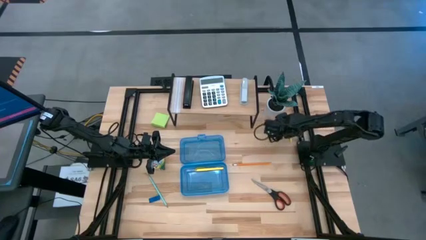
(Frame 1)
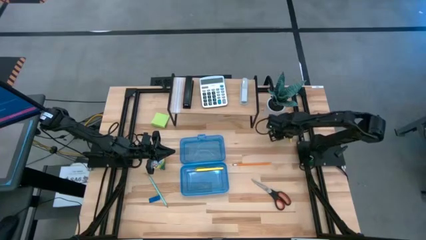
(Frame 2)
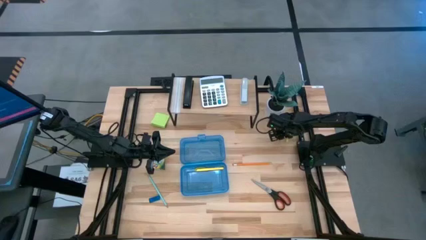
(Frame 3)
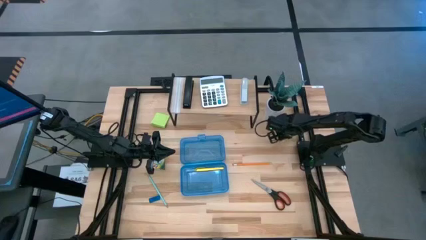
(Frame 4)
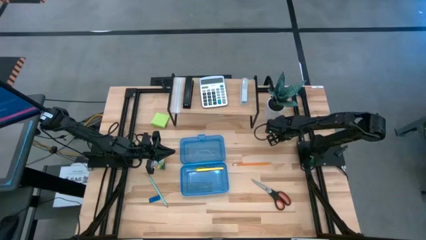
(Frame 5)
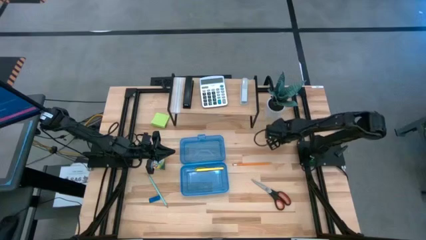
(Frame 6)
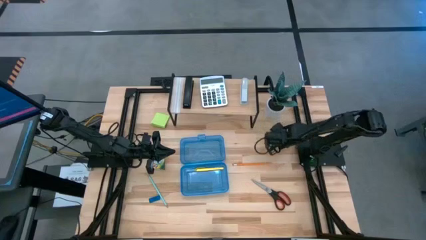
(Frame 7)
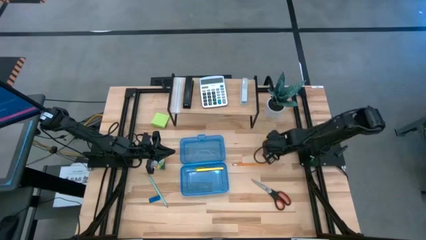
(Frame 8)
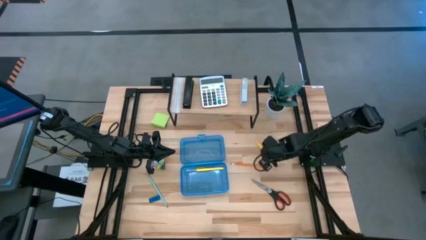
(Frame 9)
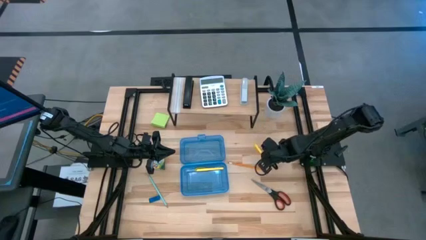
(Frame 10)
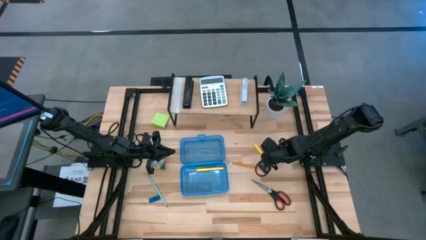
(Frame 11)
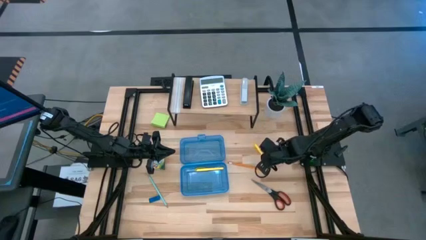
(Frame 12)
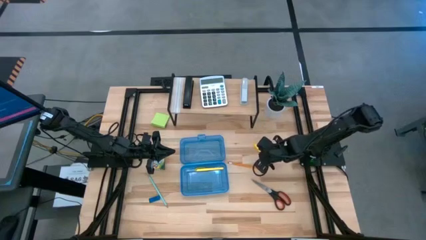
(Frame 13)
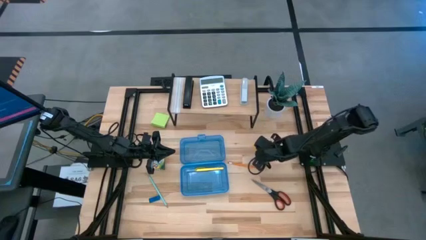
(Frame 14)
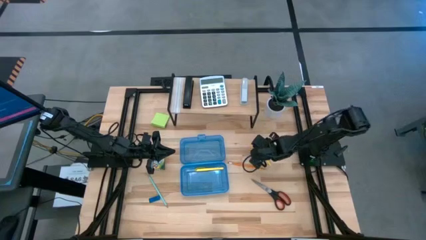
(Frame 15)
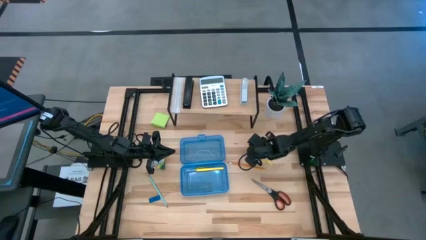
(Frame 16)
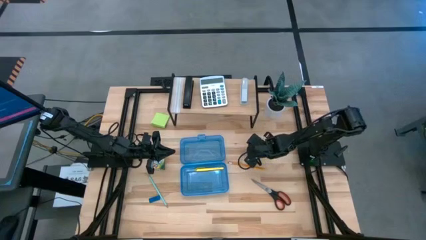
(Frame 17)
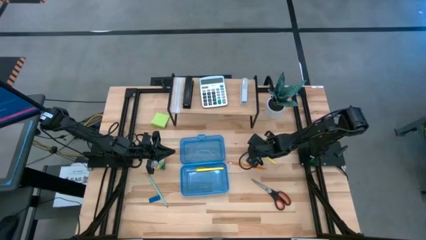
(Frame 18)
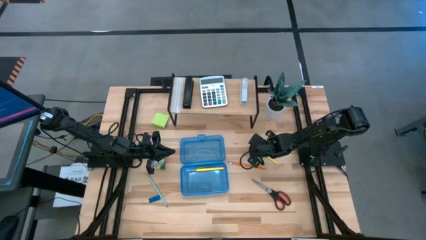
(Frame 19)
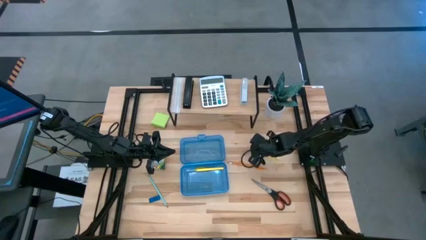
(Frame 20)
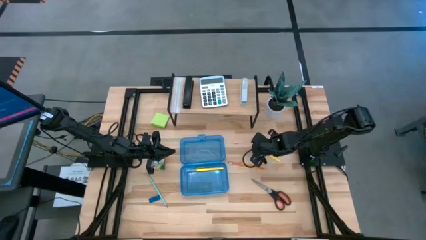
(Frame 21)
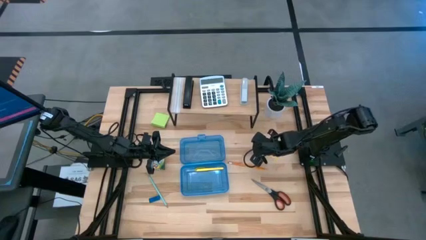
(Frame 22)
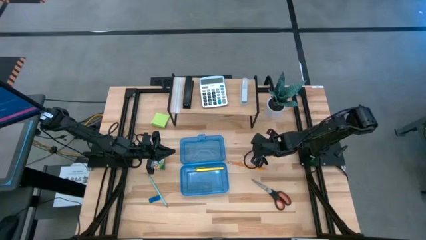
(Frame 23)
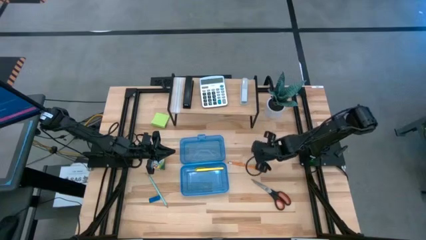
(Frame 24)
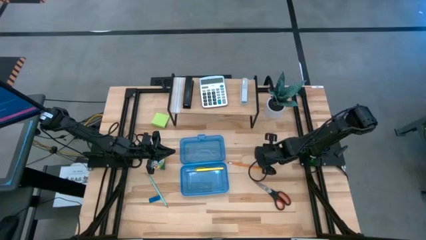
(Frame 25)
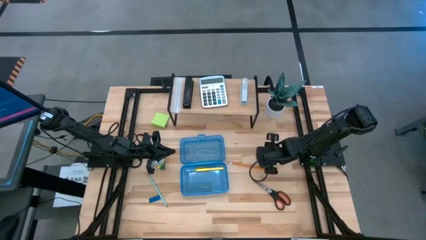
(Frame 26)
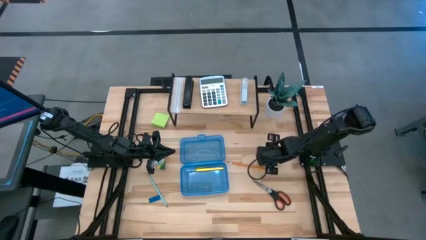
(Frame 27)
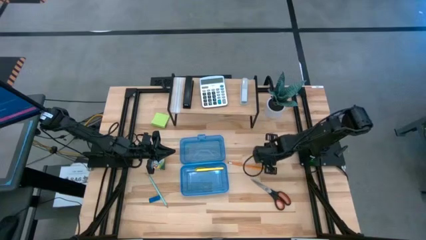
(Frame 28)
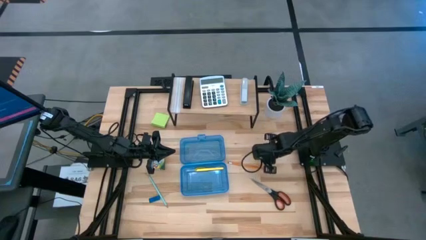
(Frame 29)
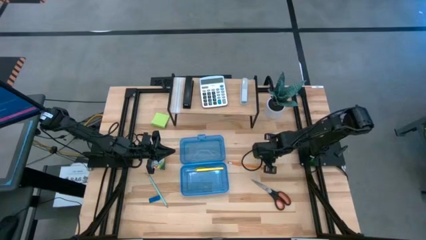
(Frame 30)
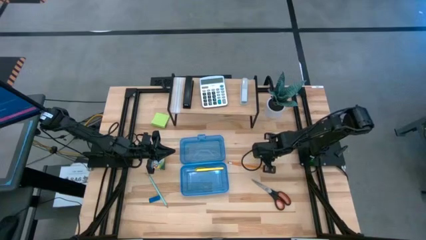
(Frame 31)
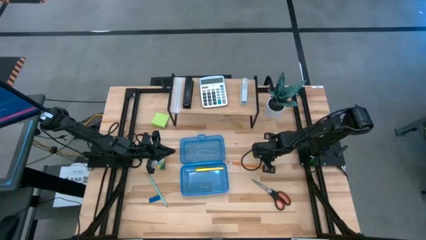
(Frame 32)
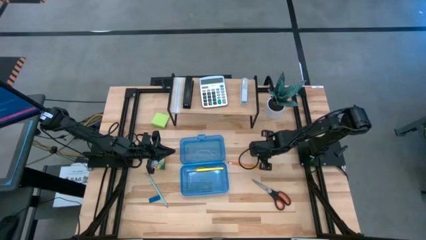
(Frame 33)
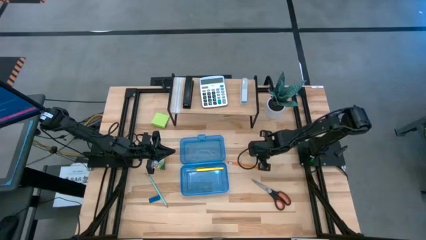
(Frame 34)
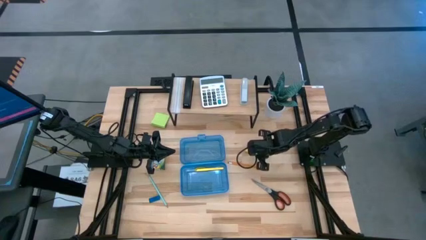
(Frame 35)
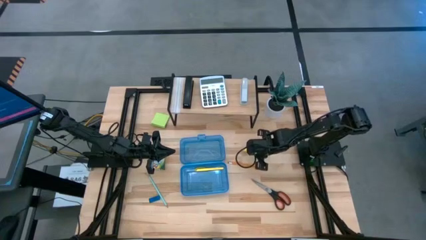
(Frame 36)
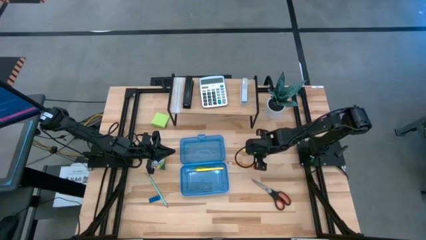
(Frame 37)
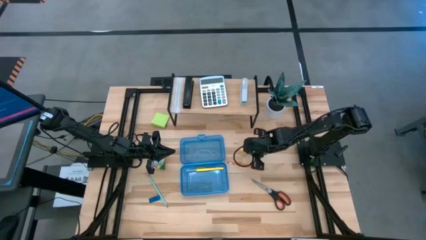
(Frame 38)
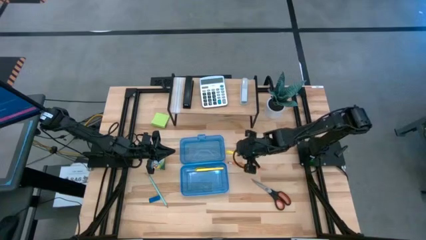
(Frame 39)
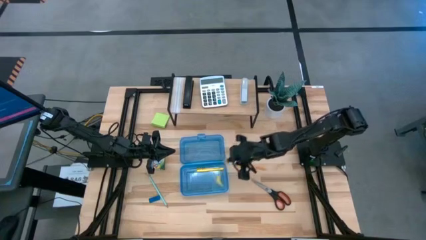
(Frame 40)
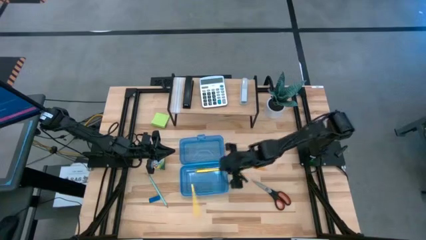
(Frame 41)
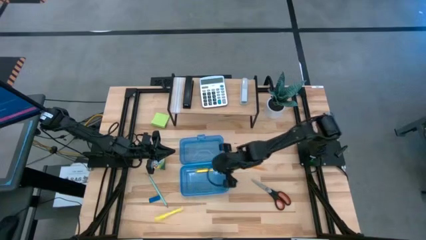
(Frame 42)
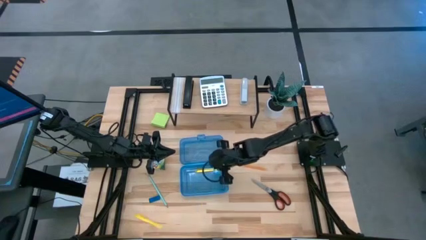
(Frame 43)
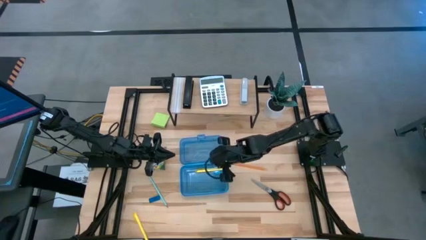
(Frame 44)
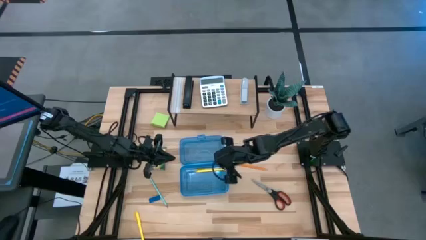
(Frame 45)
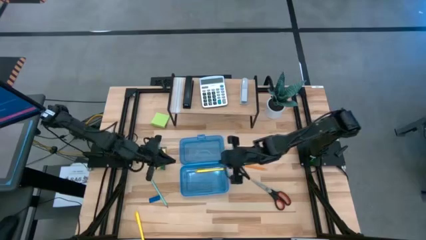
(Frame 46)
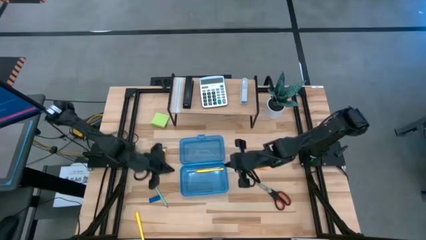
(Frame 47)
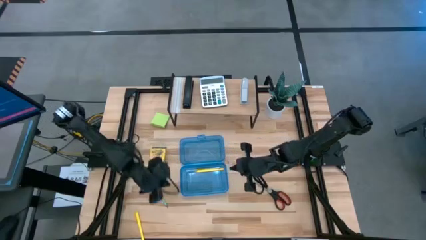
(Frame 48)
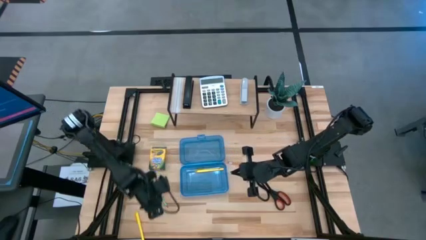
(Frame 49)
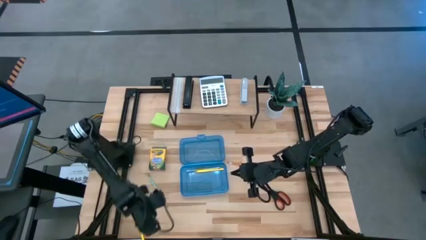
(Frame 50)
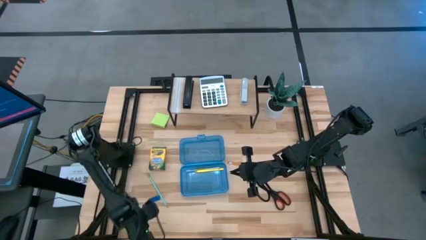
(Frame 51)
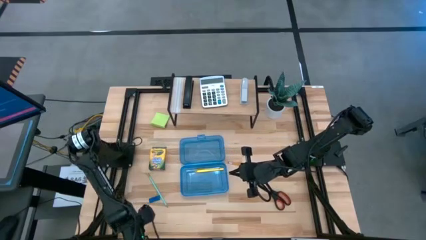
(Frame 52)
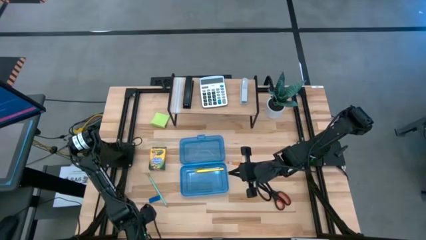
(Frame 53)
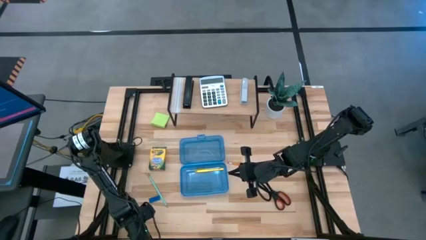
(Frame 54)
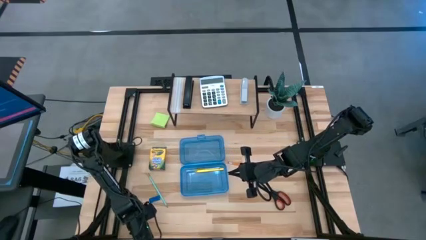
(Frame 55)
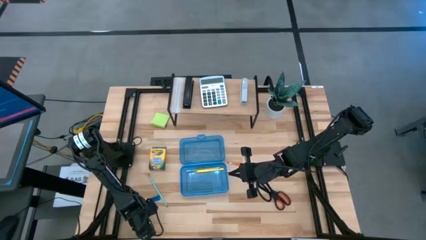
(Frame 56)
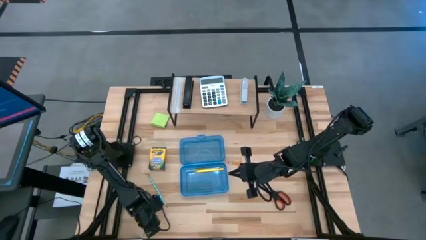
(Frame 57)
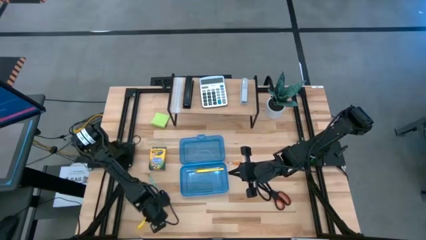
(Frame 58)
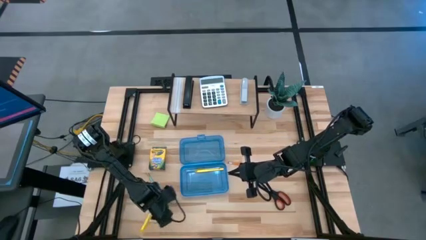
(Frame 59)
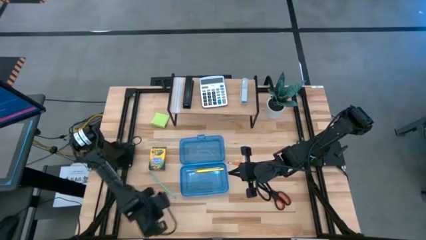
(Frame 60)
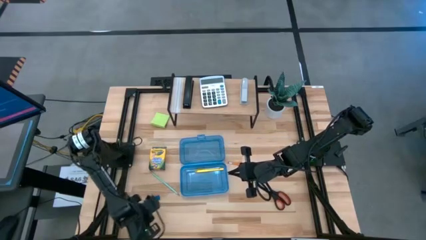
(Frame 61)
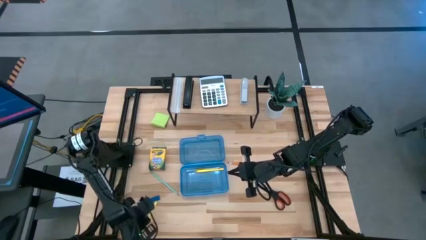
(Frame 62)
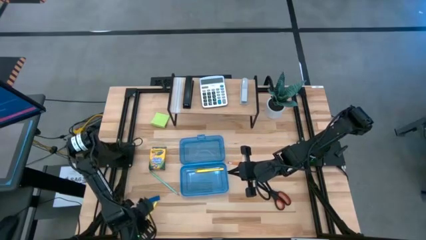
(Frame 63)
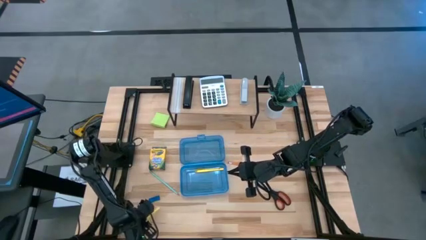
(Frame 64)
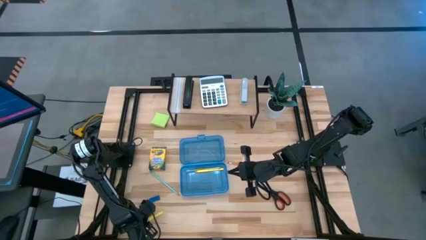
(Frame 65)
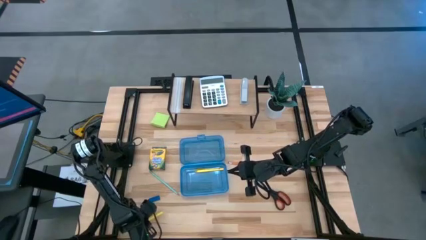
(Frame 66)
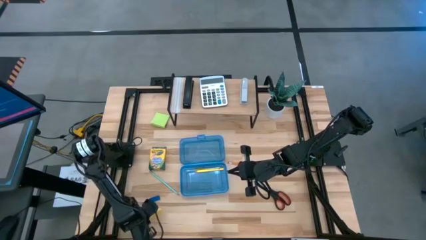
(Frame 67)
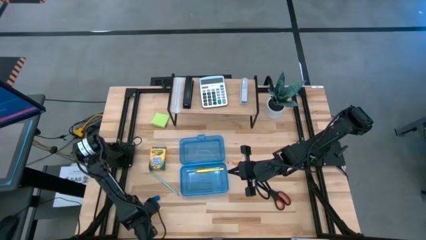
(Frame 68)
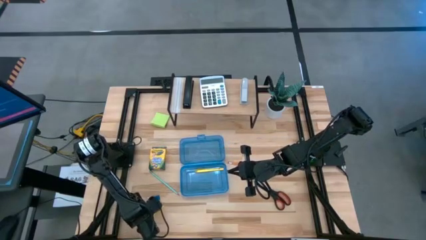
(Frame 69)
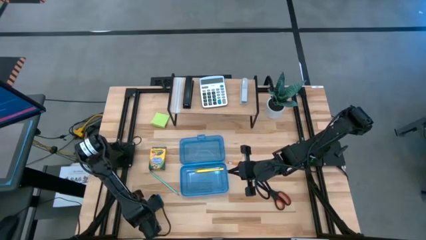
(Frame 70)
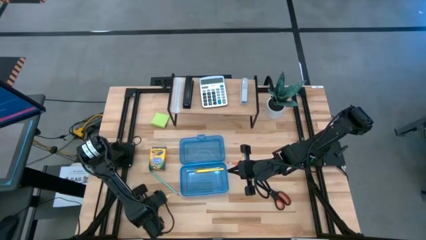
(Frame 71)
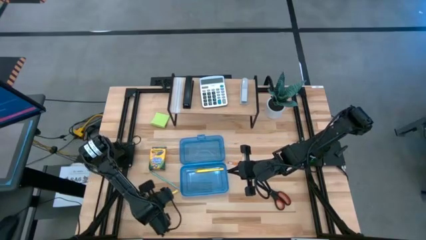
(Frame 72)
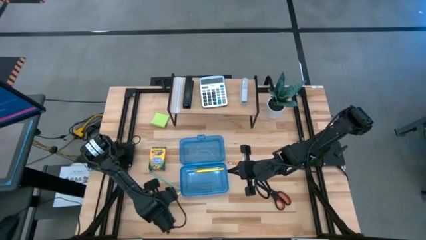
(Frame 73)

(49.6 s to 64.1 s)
Task: Pack school essentials
Put the yellow pen into the blue supply box

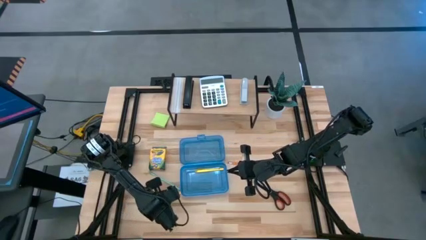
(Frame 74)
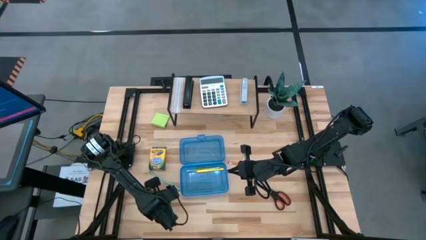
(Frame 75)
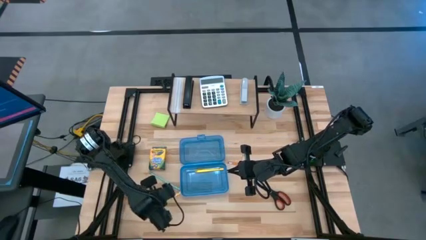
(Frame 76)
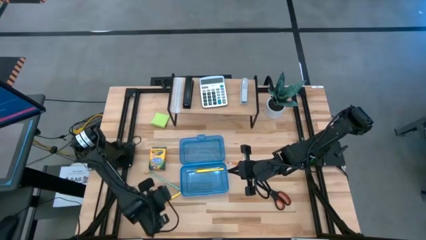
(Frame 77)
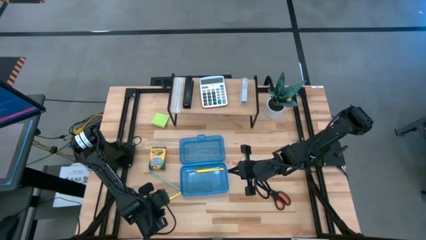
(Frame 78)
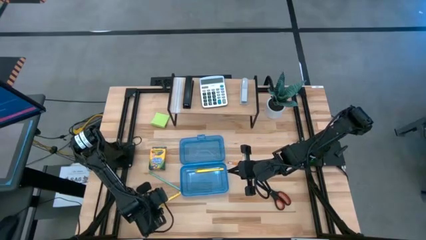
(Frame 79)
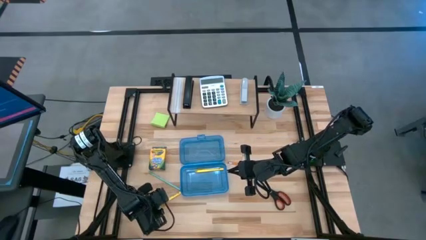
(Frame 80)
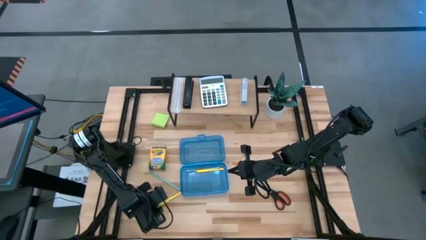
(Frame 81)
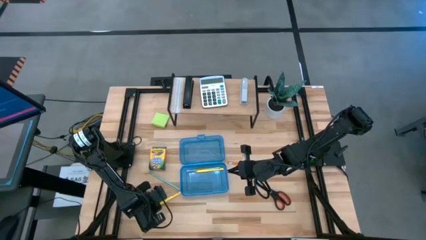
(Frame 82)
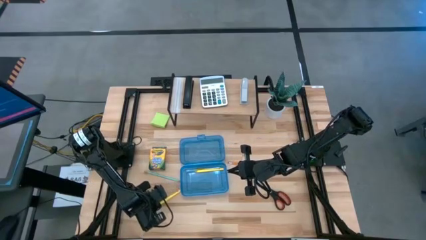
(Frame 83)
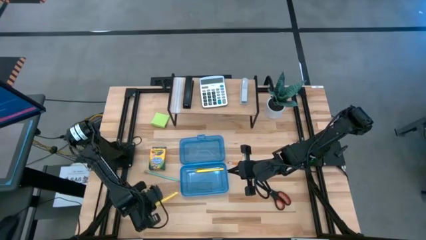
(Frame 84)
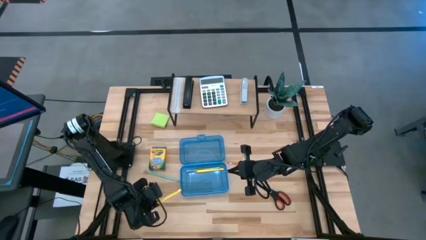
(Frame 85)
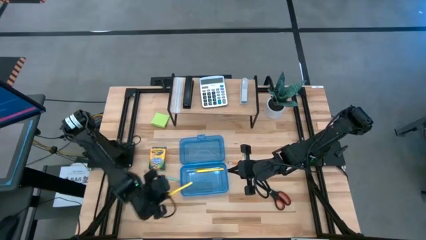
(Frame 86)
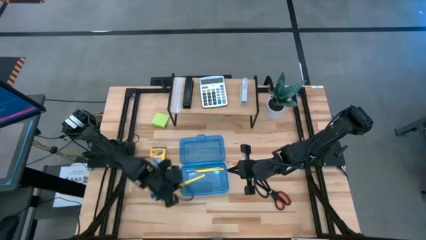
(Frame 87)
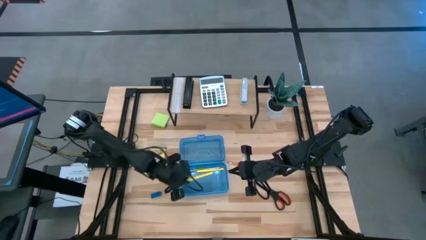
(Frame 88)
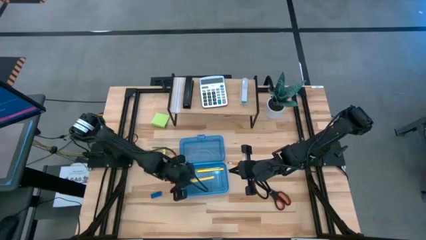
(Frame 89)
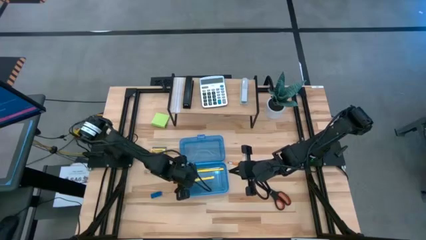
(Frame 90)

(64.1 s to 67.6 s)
Put the yellow pen into the blue supply box
